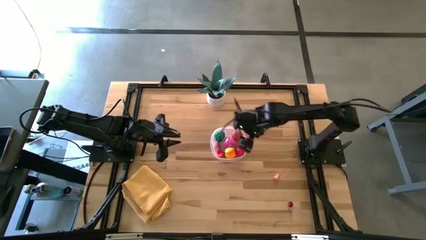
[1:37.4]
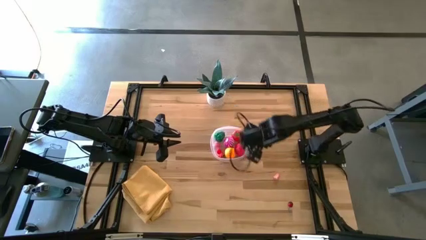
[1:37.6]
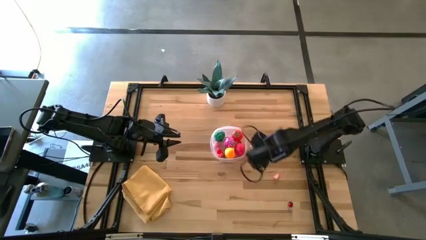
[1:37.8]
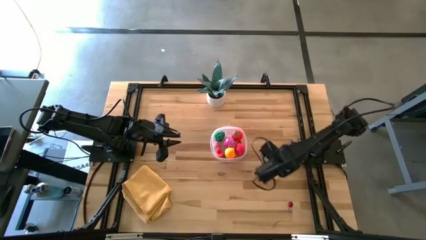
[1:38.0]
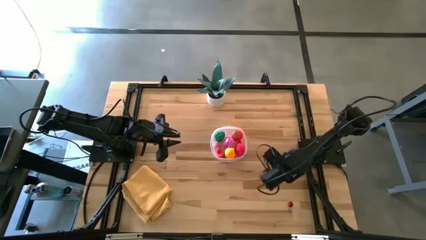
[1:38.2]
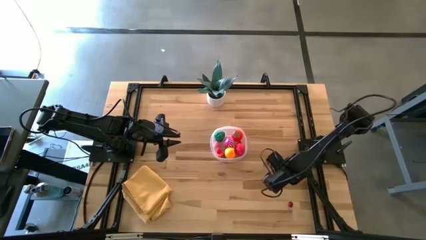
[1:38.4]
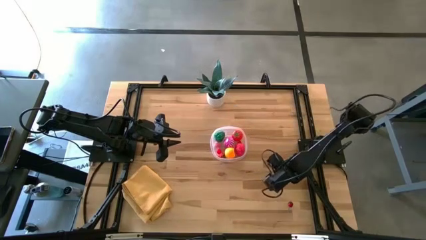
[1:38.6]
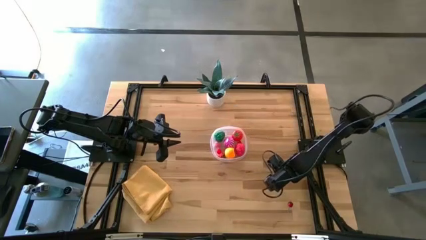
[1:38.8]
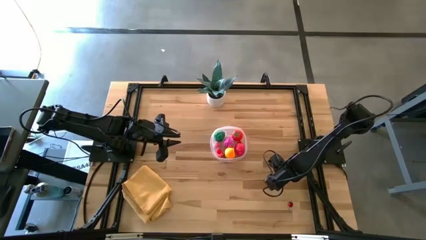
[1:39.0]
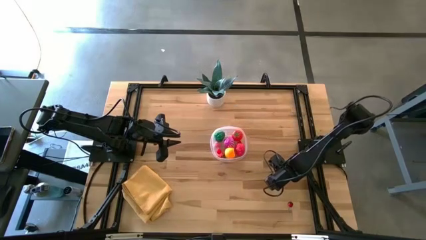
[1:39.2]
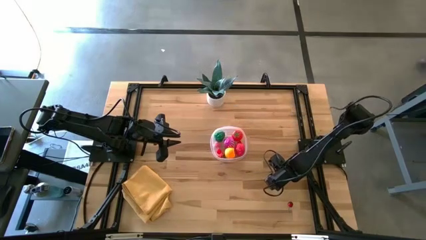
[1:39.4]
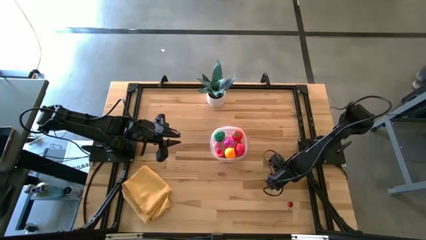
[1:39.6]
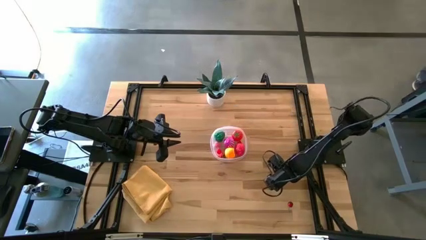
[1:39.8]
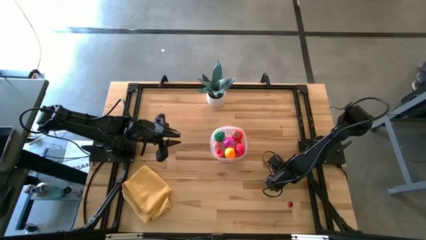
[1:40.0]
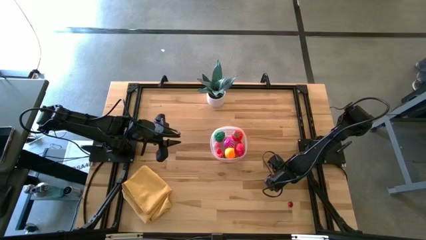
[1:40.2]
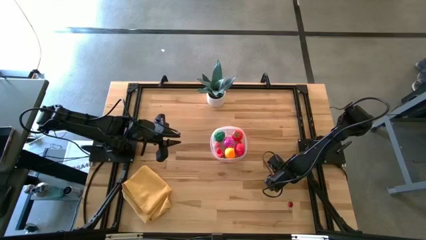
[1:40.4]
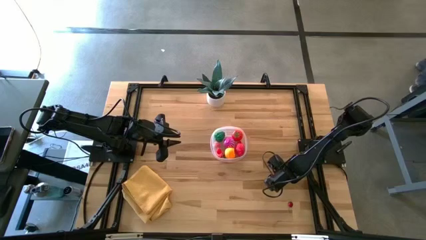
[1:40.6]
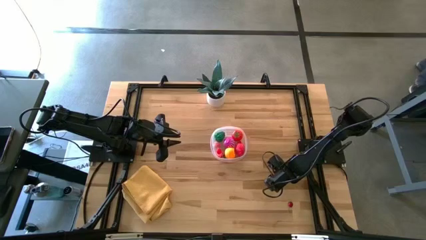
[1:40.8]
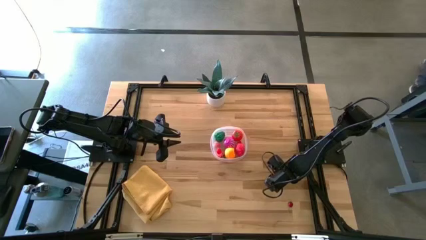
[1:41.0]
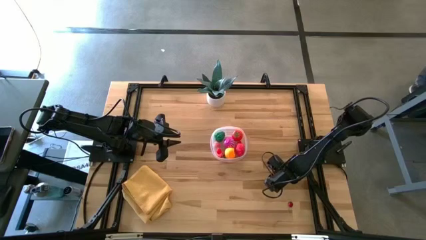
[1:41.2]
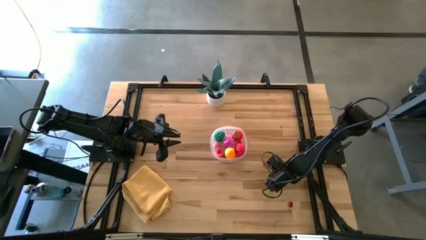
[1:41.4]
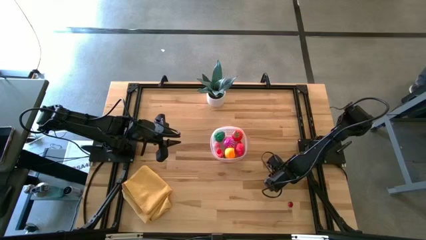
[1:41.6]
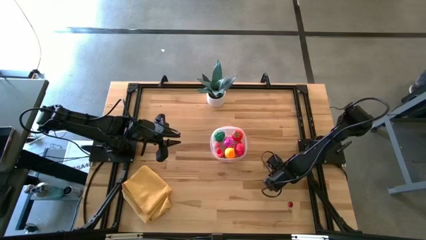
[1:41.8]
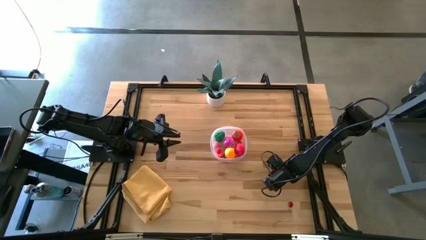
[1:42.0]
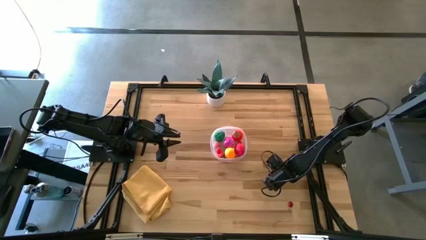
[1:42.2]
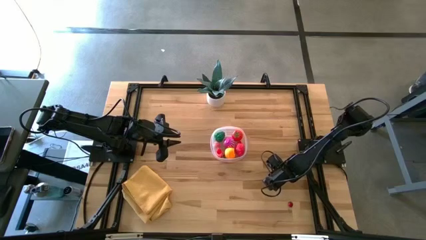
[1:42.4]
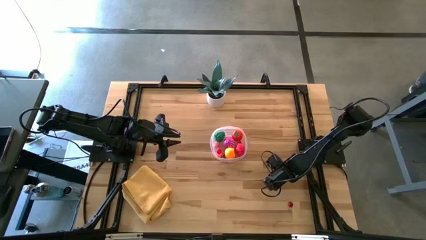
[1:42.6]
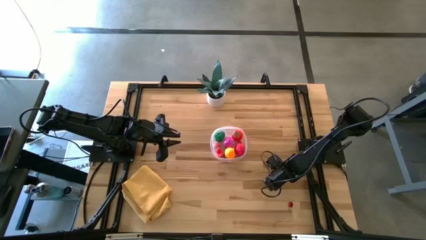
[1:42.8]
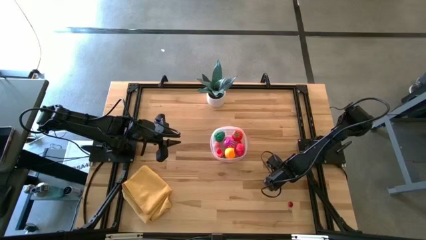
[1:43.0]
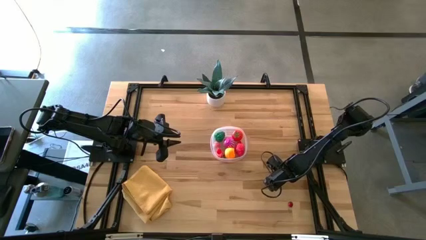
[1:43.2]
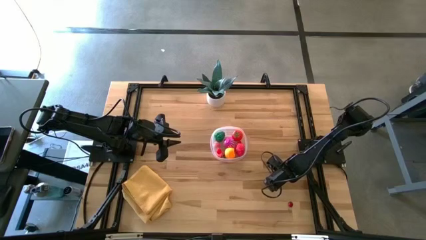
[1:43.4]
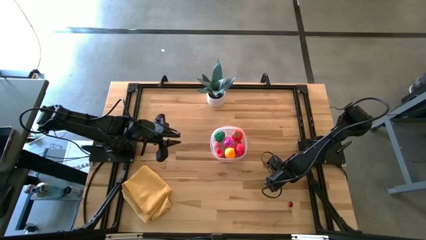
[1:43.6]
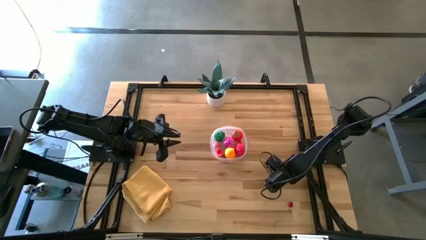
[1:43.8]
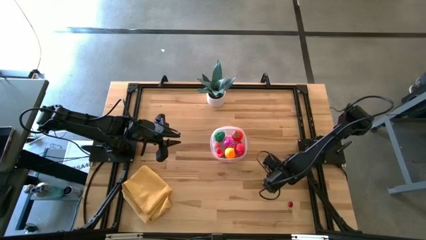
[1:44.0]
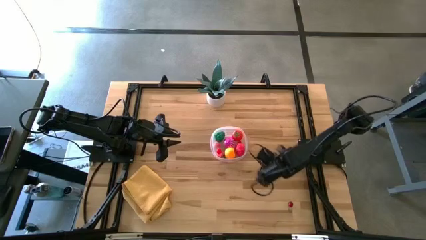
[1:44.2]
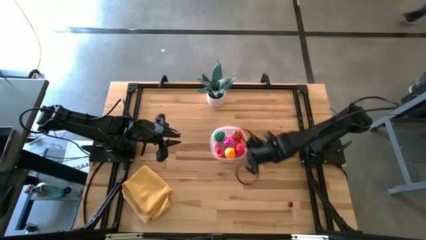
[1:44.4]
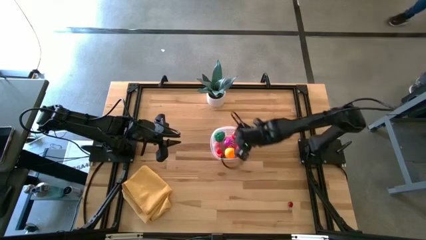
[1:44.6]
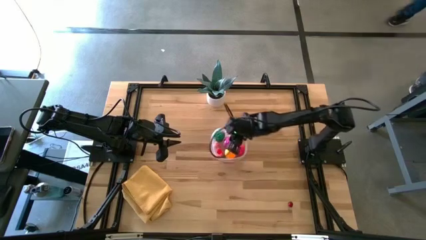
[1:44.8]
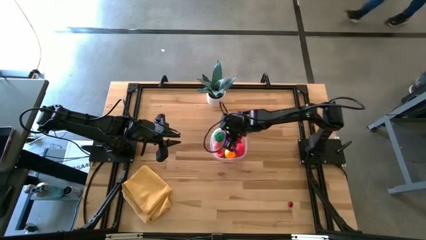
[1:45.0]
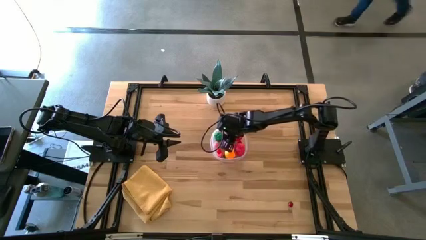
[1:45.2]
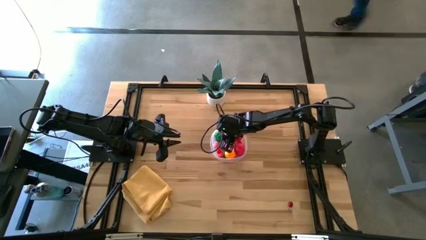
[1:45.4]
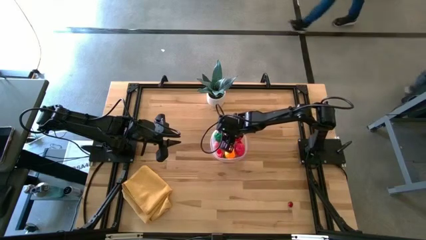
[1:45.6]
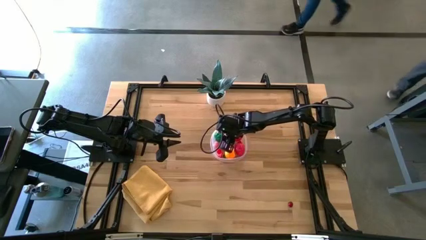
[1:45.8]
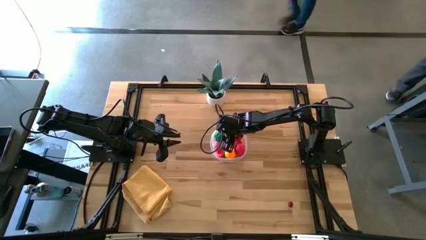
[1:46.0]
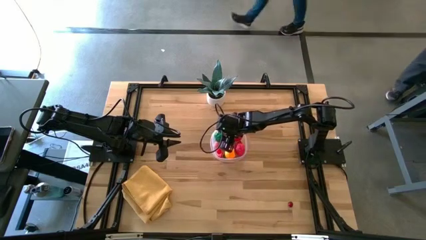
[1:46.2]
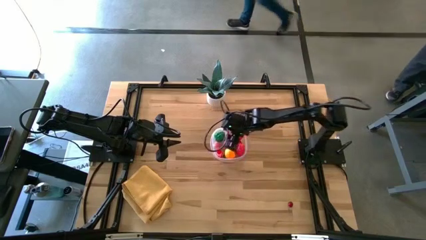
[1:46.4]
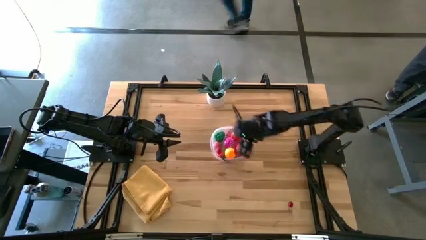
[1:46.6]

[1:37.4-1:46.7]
Task: Pick and placing Produce into tupperware
Put the peach into the transparent bin

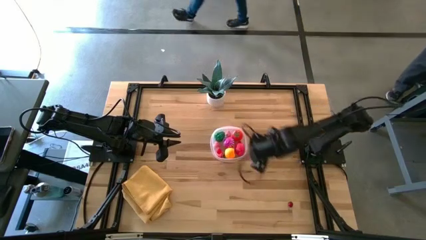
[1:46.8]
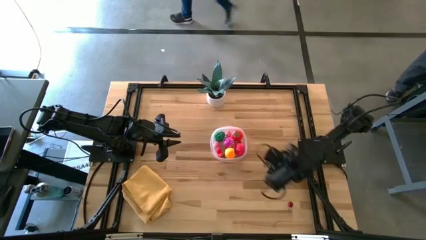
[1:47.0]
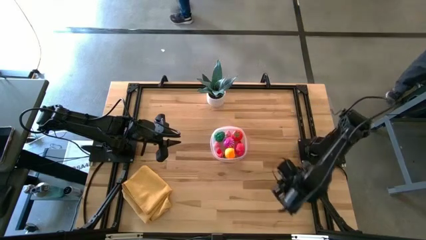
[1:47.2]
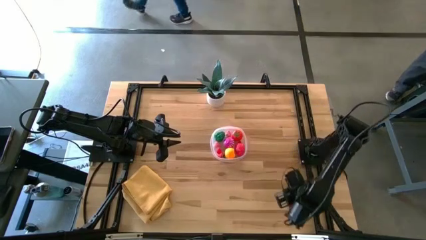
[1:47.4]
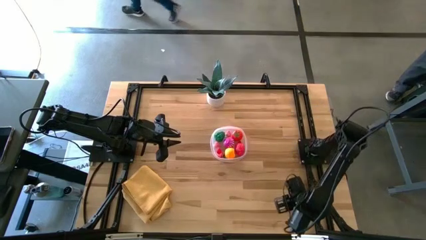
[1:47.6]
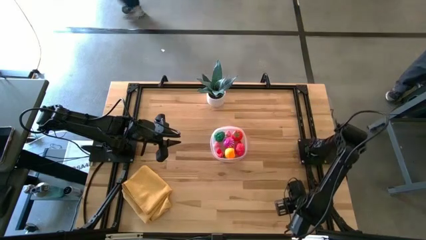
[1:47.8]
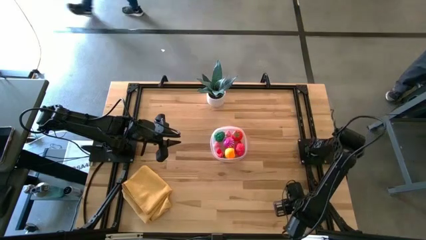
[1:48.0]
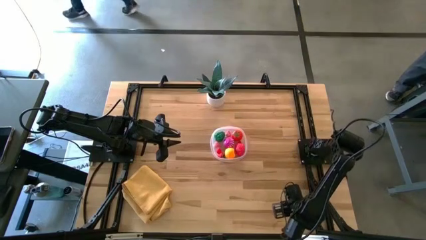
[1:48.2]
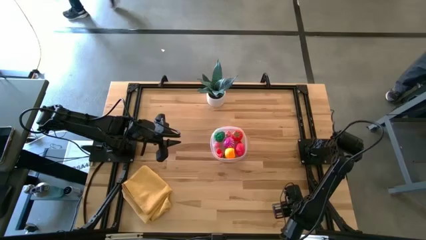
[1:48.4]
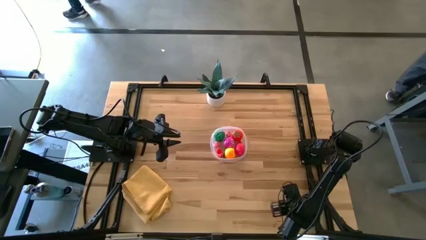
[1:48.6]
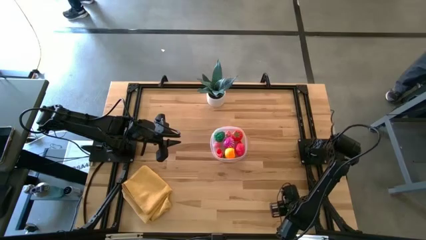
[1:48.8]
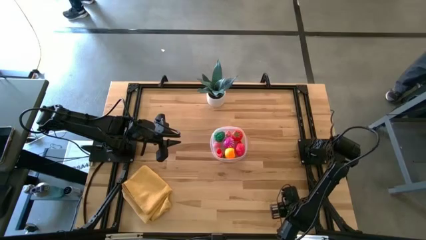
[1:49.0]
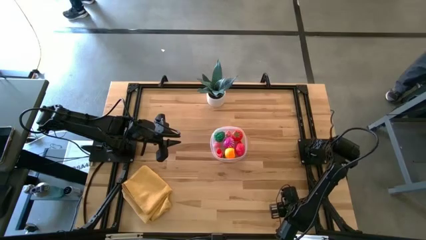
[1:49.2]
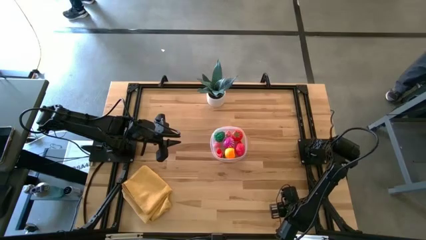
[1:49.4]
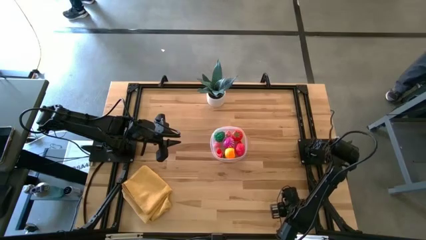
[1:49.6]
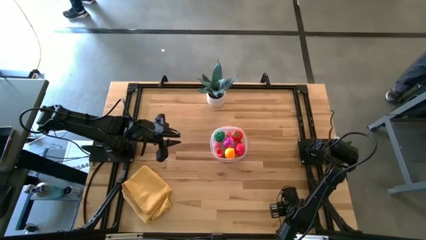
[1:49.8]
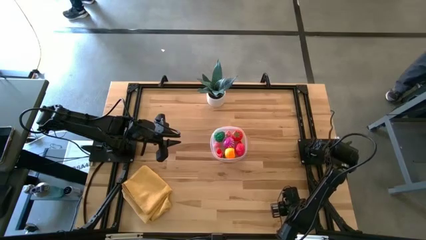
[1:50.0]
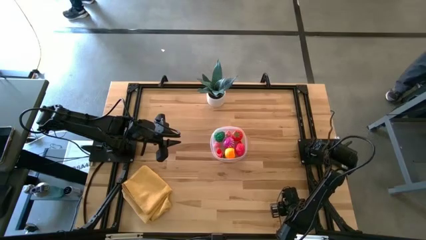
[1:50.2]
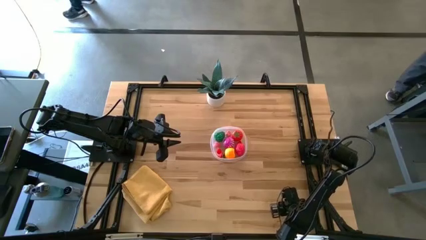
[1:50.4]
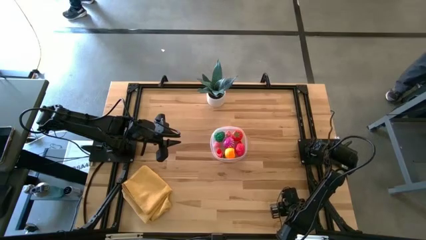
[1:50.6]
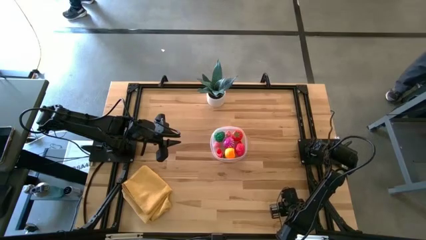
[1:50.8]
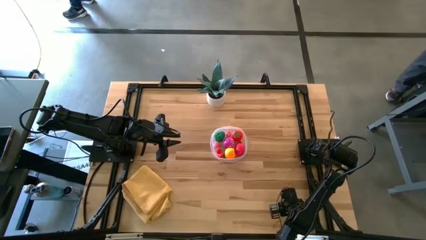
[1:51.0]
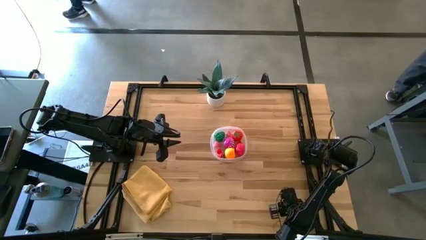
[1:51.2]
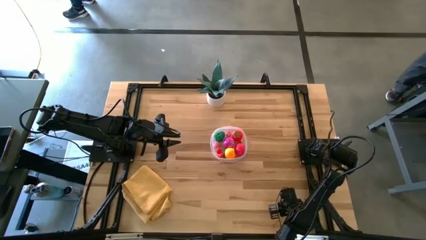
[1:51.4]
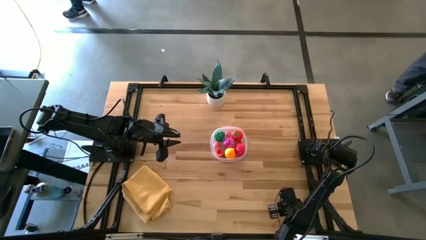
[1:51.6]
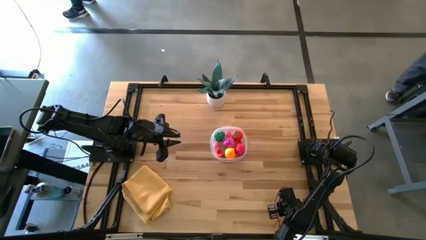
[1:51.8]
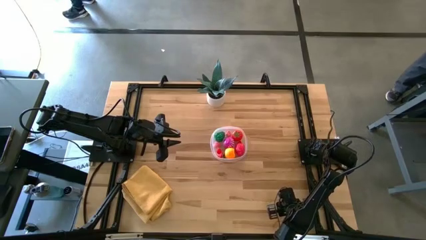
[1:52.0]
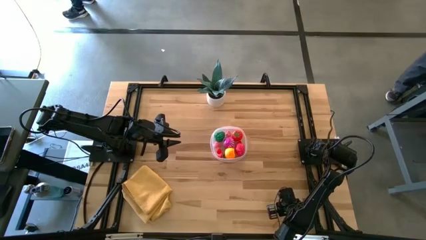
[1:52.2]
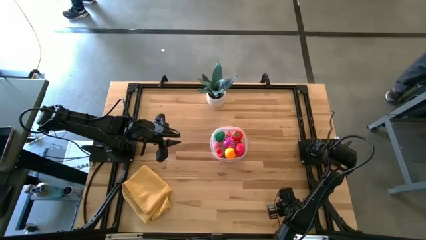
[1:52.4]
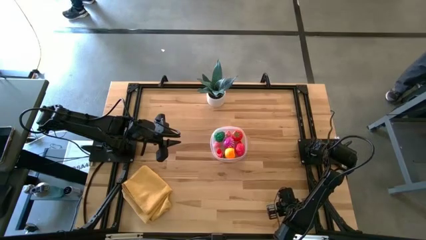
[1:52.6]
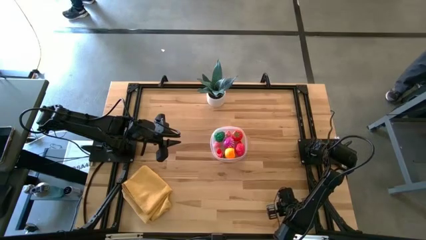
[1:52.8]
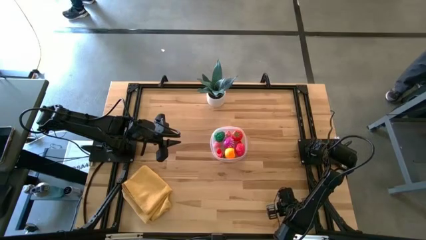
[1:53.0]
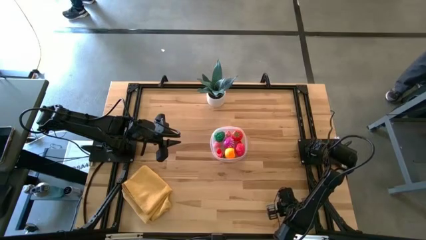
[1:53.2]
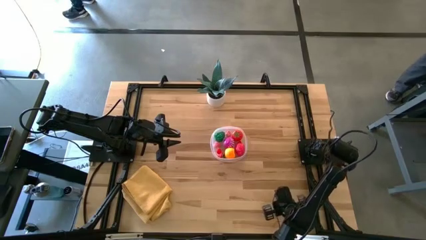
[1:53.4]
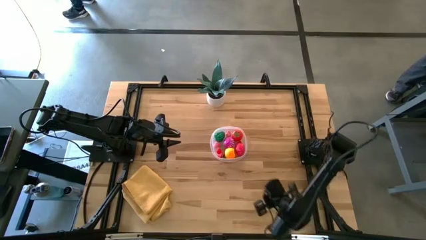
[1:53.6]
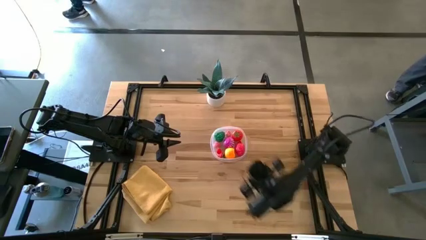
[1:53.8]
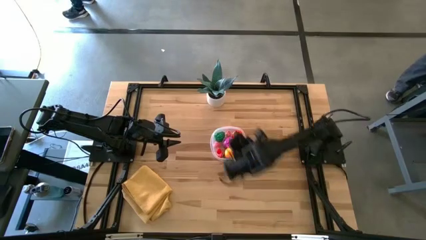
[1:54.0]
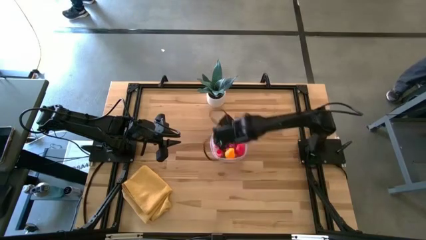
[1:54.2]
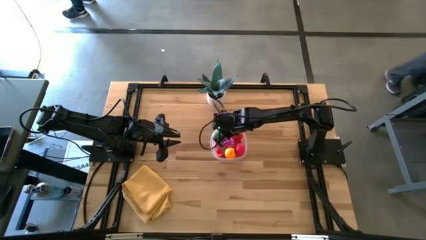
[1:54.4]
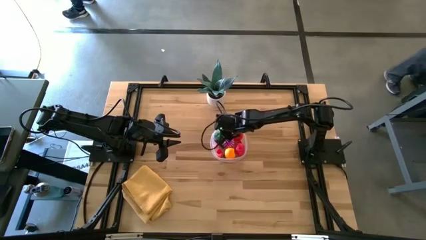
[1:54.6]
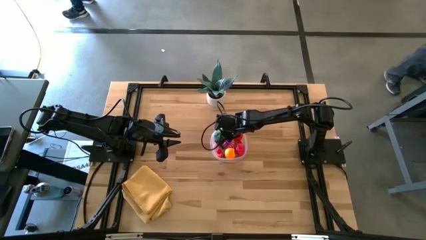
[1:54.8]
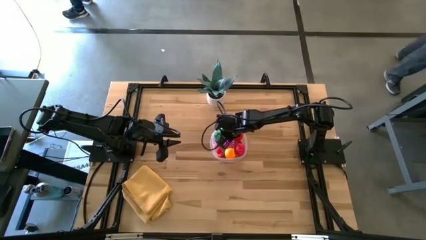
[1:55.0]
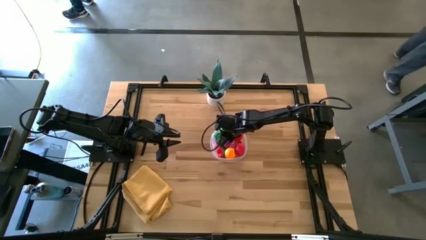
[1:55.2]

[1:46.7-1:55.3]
Put the cherry into the transparent bin
